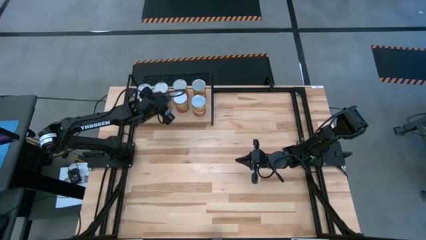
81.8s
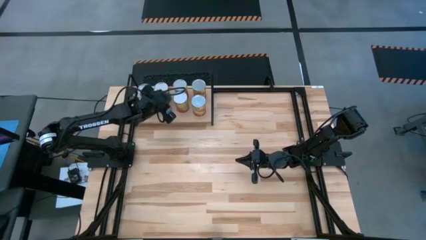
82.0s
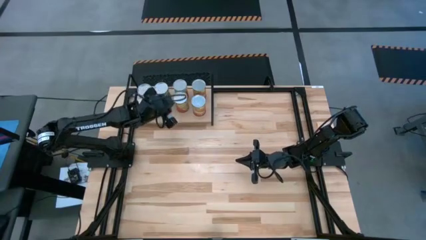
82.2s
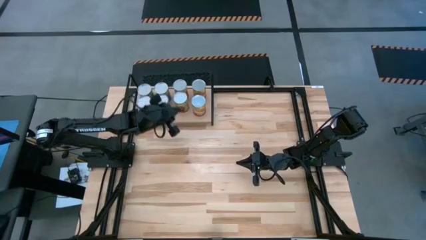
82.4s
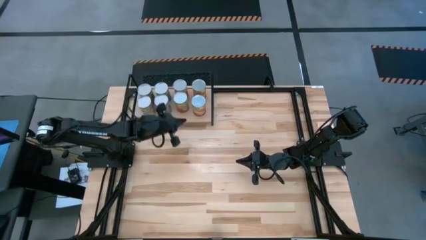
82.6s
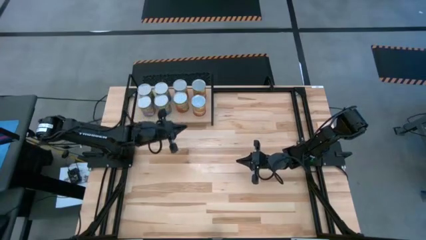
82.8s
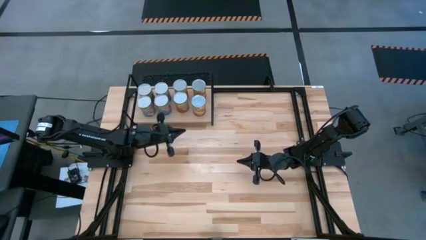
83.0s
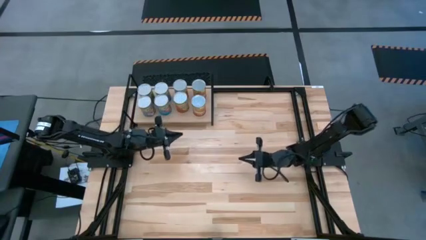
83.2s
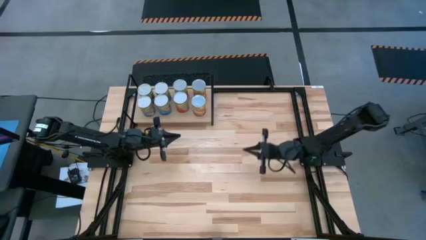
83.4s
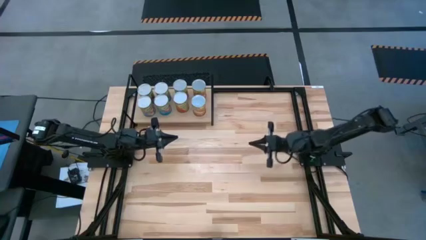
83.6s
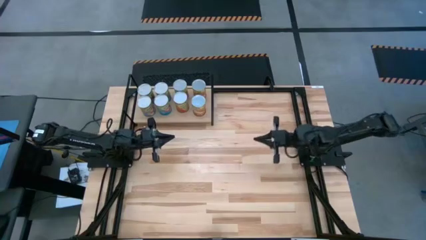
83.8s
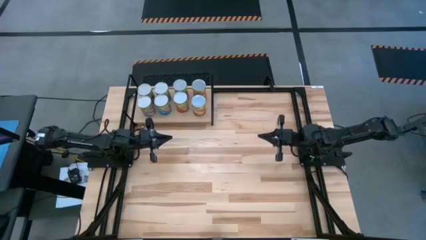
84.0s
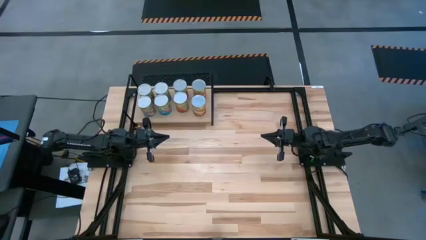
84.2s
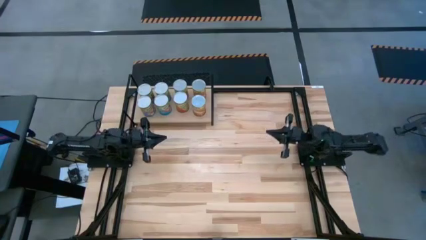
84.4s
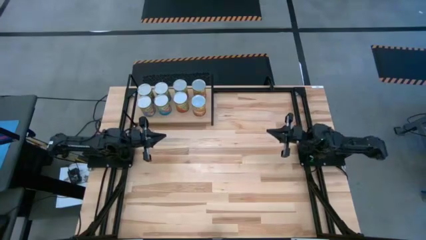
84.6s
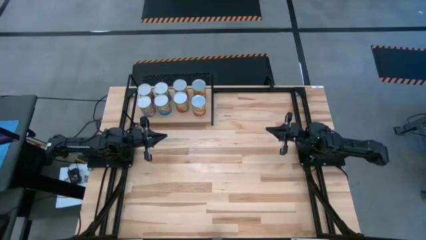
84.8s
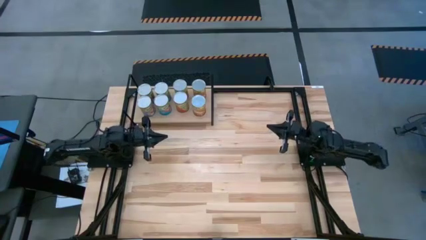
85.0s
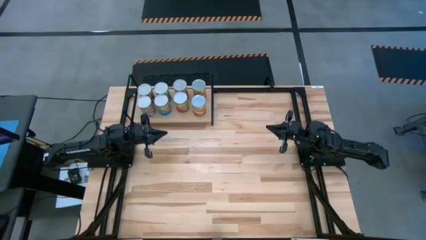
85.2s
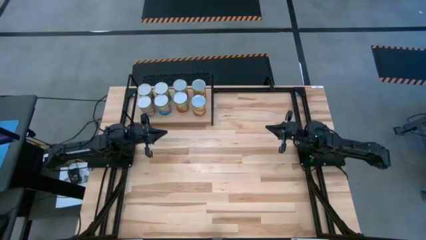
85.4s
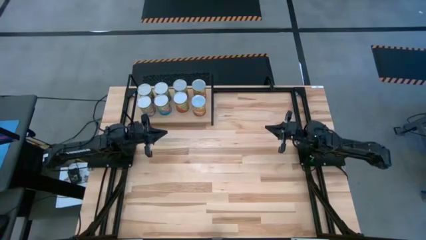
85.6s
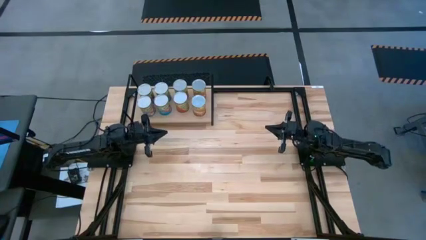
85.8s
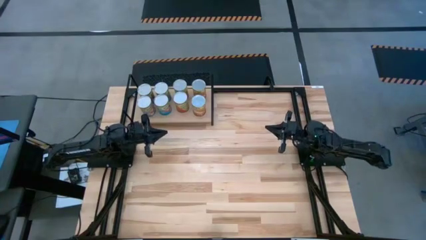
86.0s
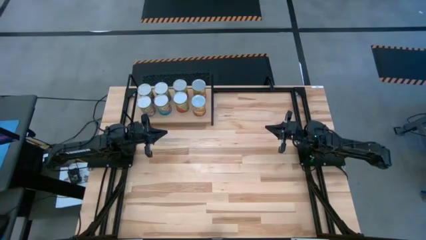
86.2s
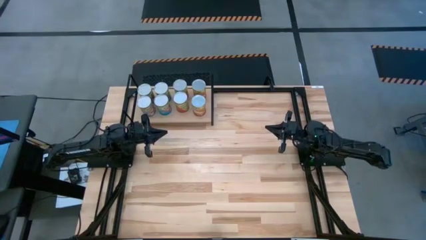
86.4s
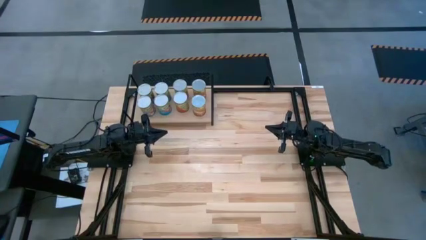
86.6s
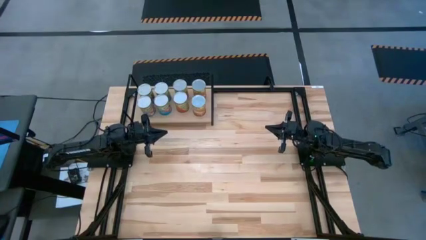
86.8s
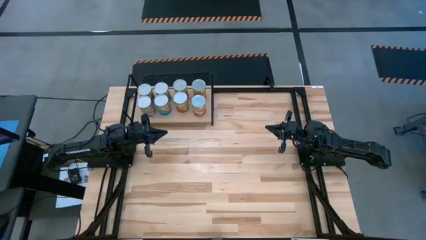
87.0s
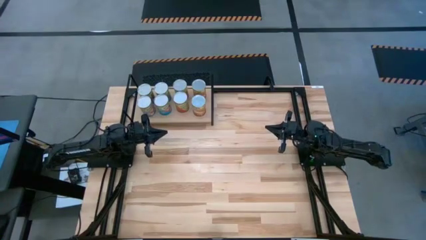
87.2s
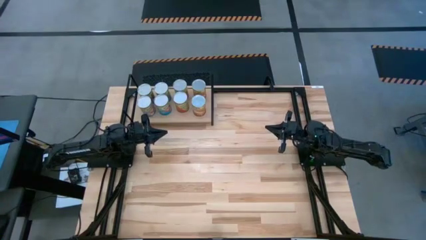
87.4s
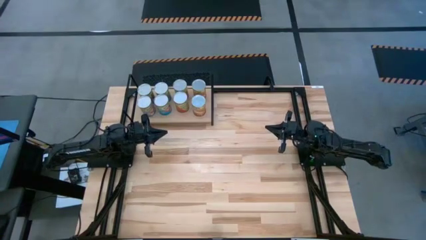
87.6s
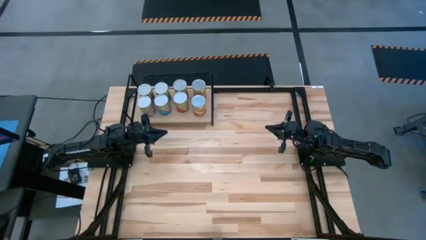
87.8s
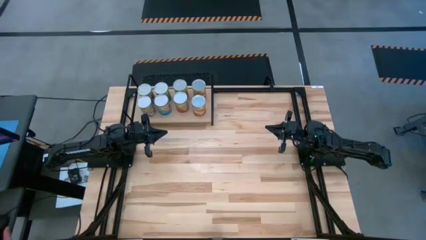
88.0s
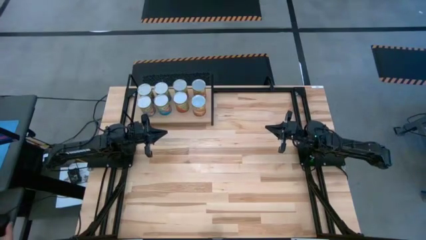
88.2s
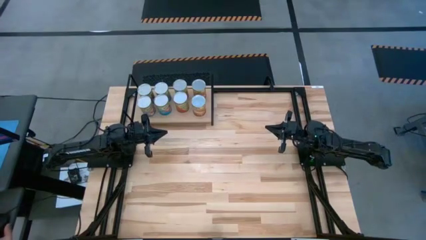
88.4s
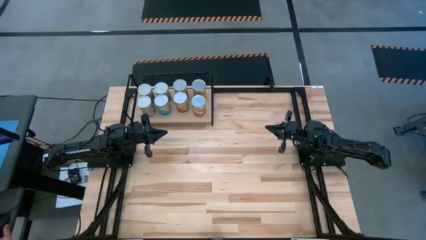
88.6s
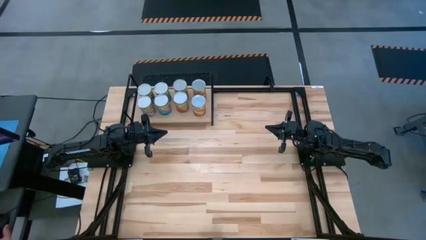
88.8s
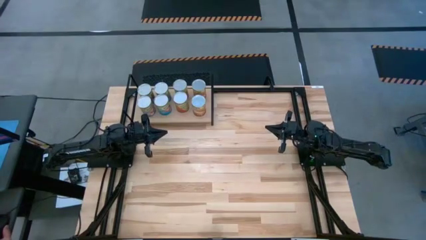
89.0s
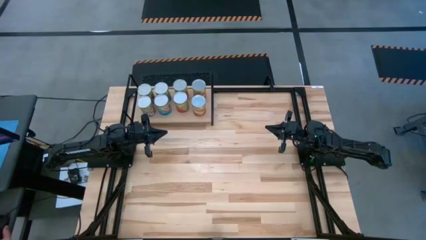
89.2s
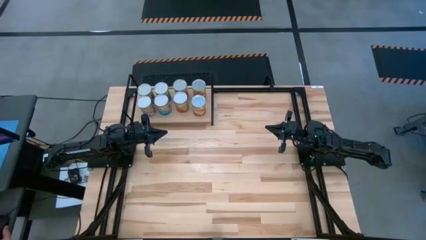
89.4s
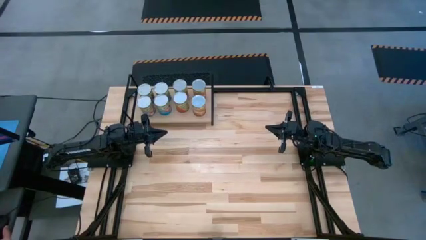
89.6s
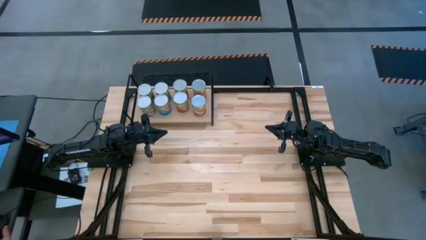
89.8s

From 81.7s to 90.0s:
Task: Pick and place cans onto a shelf
Return to Home Position

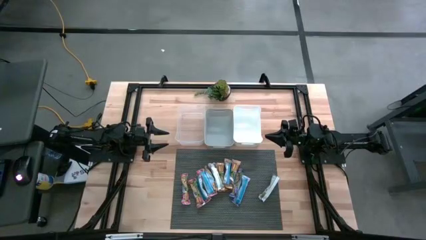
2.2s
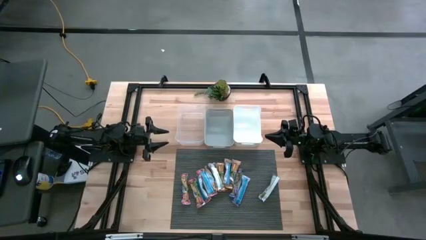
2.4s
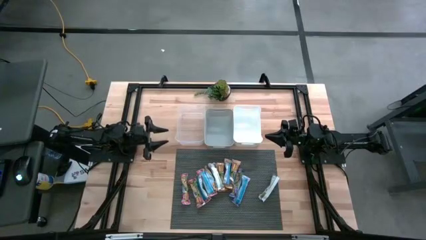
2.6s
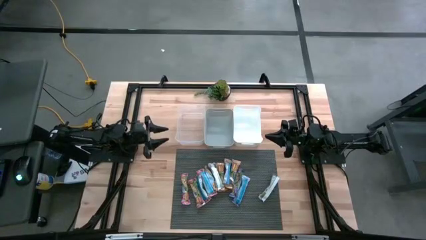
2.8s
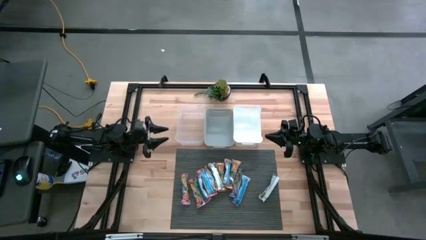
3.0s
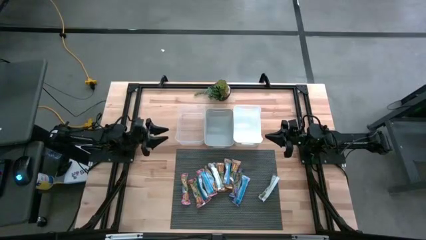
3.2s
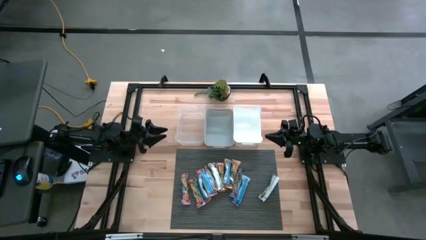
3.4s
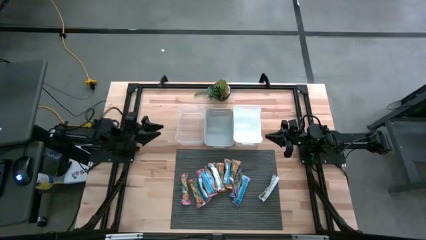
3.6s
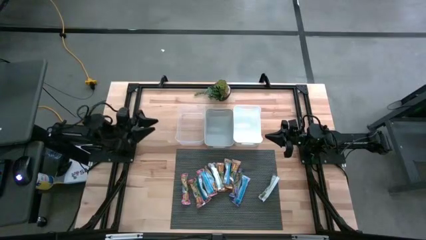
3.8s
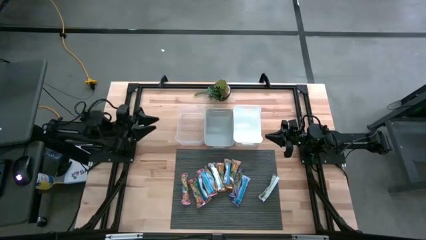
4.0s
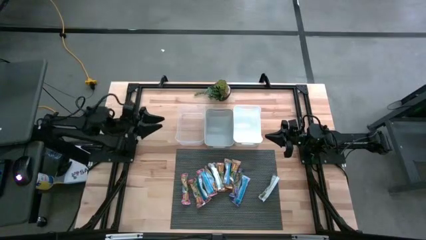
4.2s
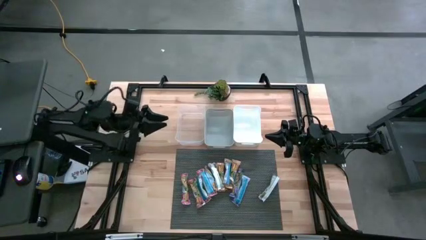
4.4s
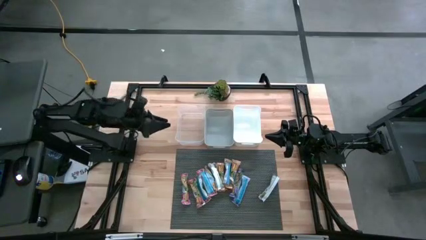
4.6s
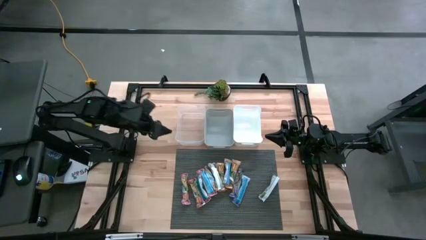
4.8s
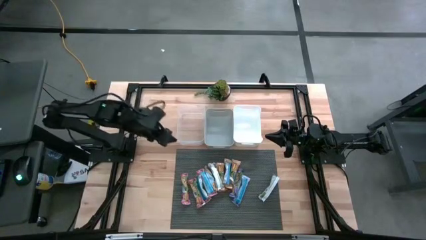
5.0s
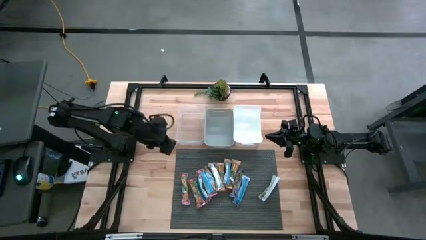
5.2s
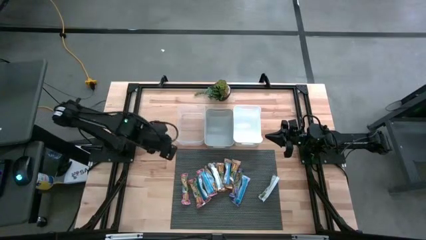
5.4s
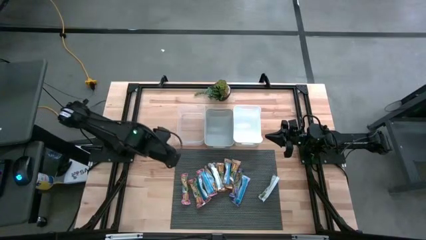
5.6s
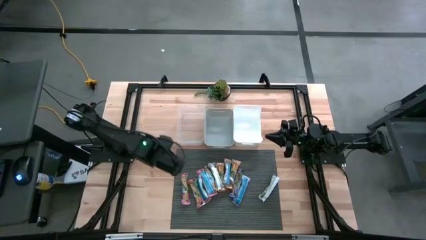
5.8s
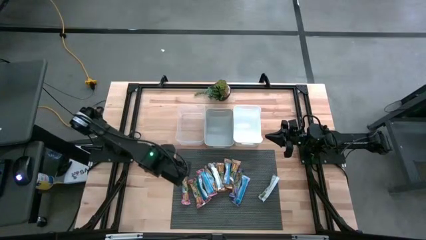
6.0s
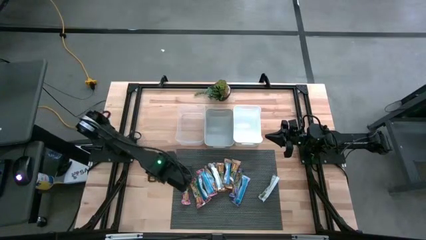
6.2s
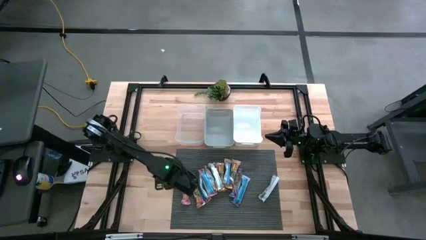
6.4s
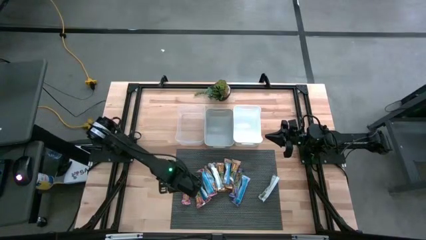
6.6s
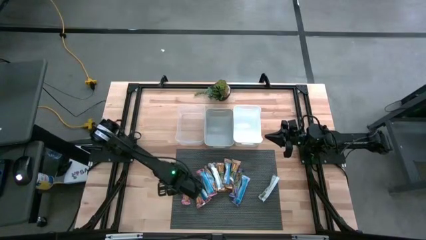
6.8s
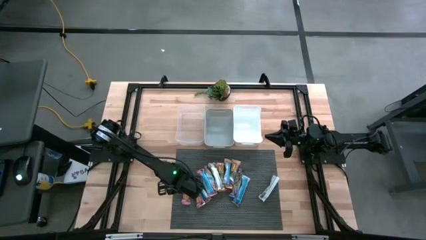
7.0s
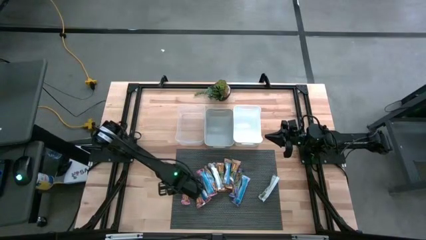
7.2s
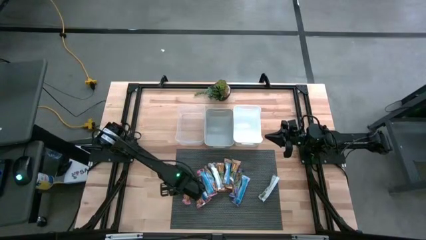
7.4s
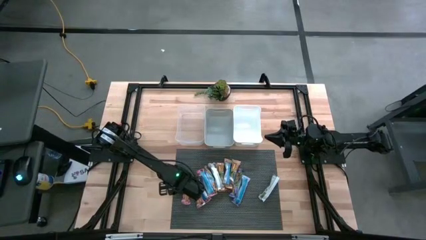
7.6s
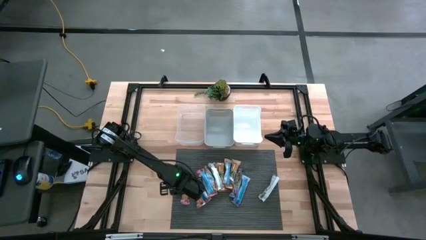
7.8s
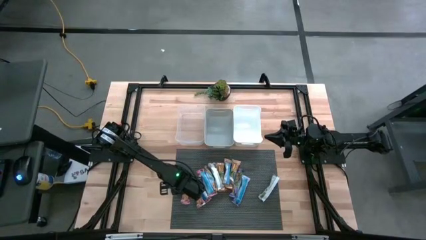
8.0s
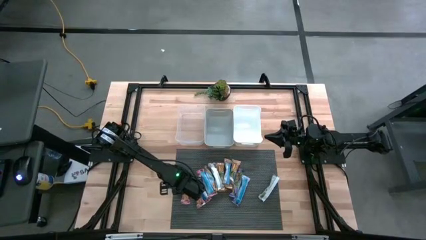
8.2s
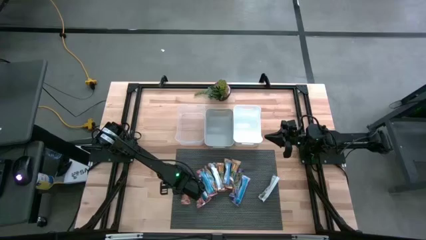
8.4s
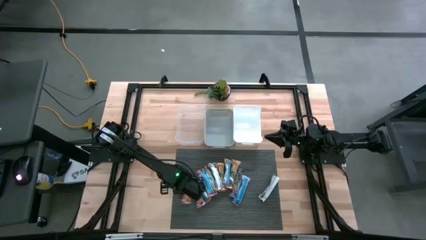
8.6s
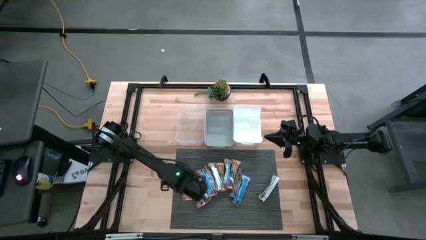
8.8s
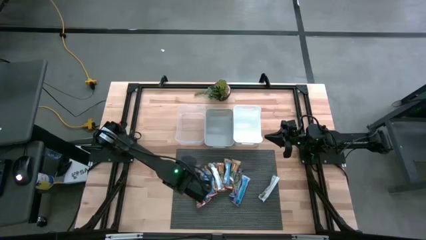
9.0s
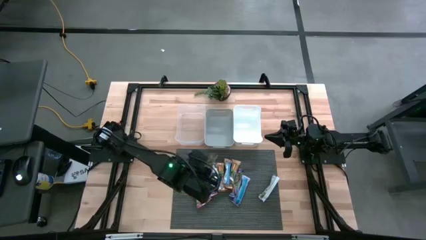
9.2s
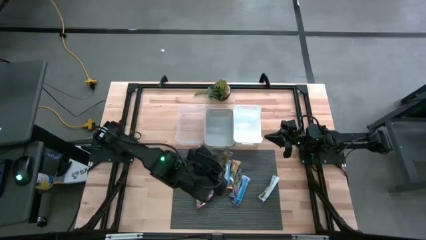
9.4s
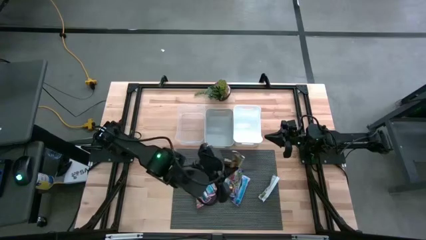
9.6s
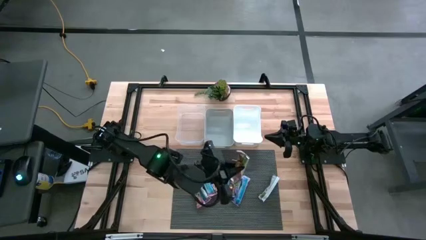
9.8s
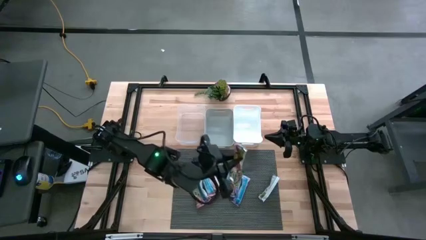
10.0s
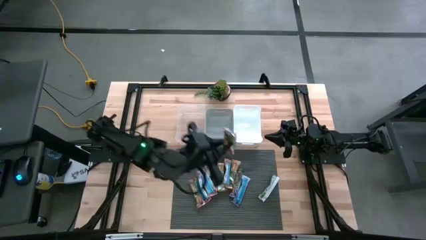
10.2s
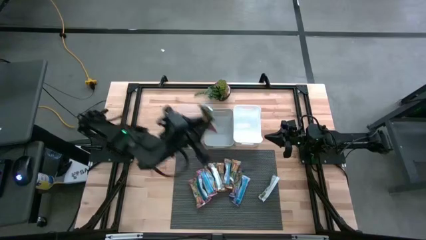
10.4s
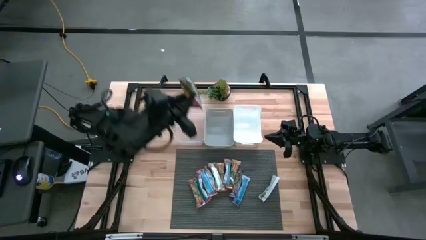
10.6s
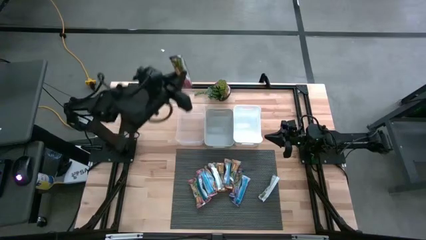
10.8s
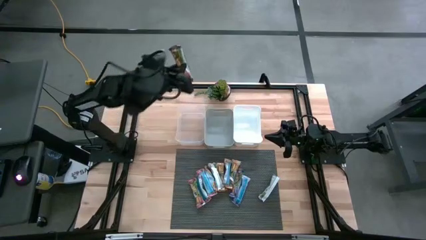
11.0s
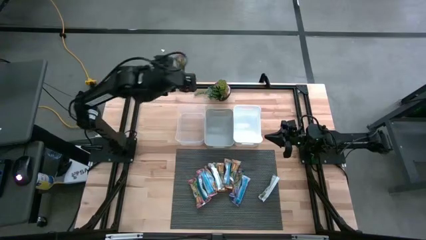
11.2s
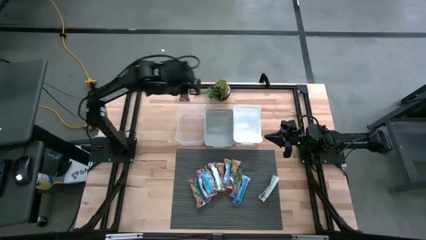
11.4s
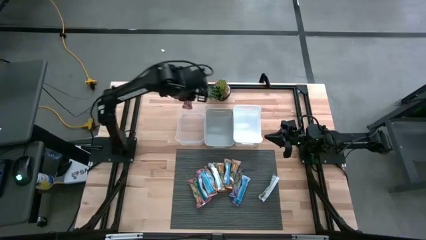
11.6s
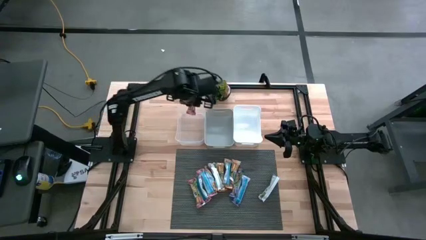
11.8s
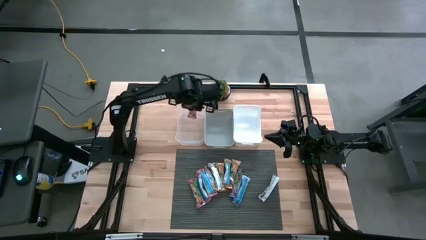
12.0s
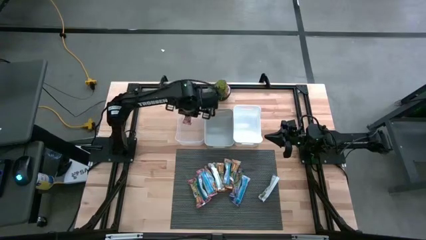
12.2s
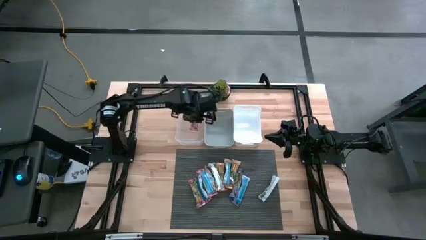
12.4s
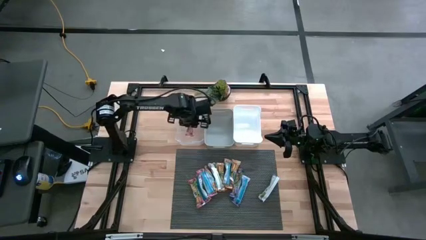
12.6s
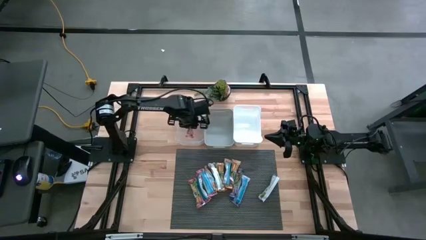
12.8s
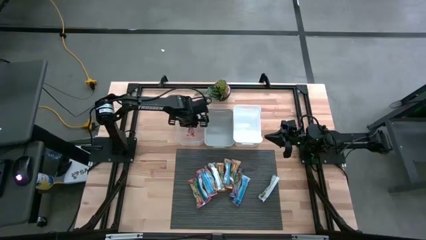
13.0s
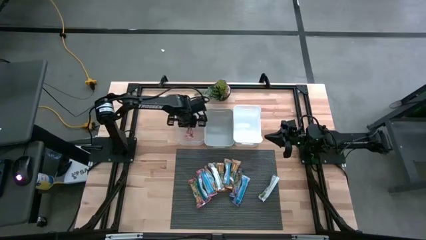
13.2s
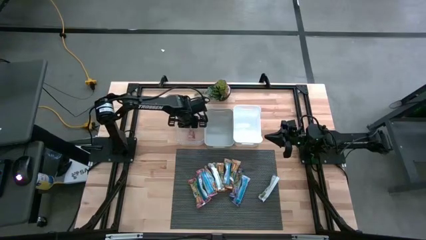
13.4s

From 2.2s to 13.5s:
Task: Pick and place Granola Bars by type
Put the red granola bar into the transparent bin
